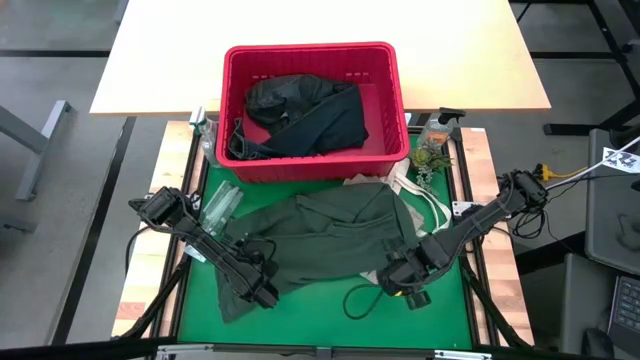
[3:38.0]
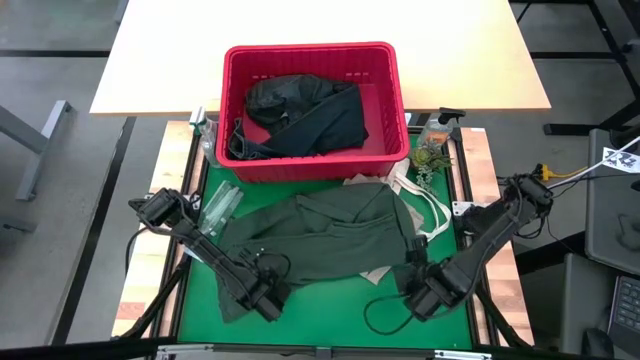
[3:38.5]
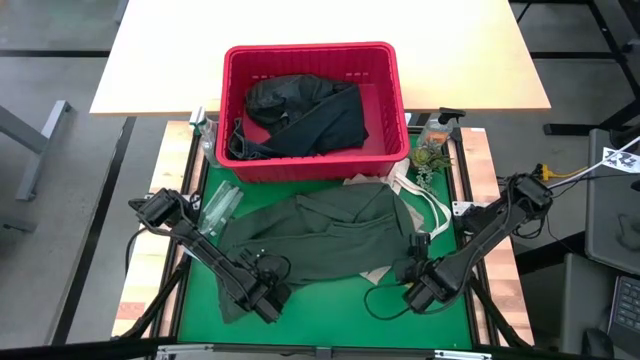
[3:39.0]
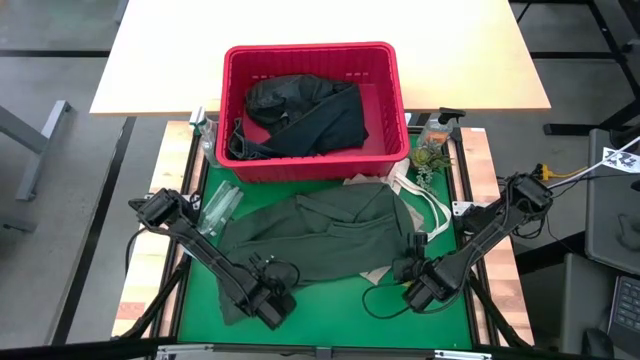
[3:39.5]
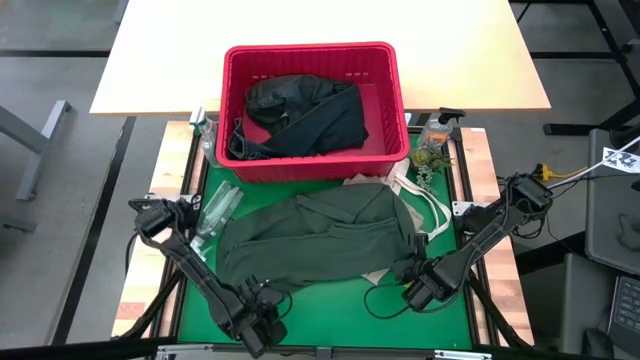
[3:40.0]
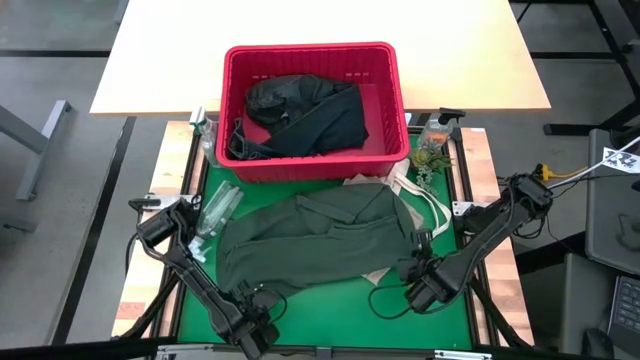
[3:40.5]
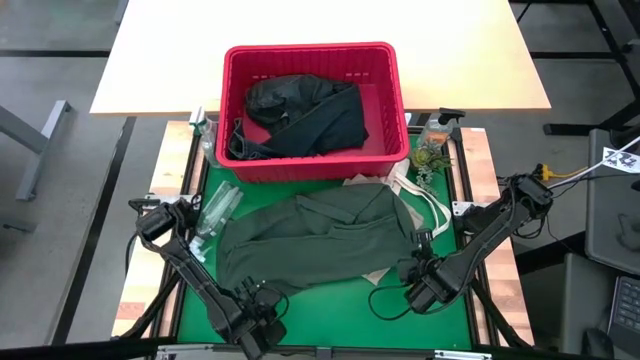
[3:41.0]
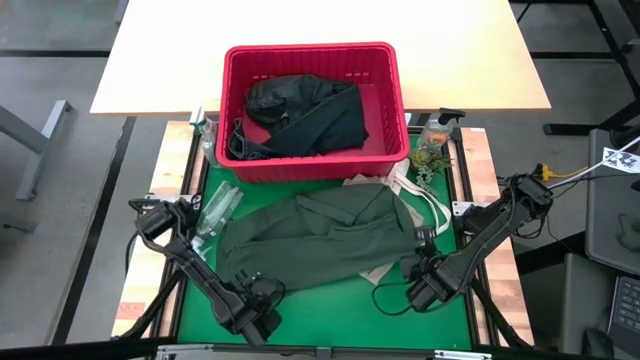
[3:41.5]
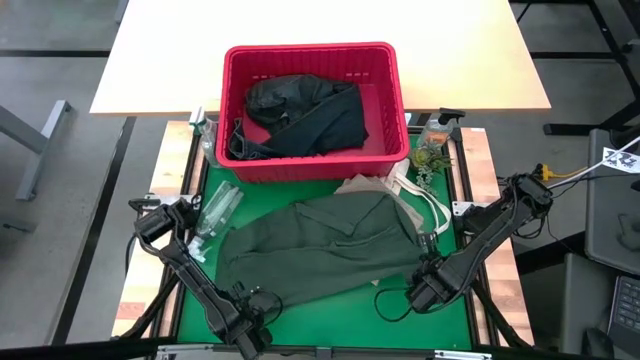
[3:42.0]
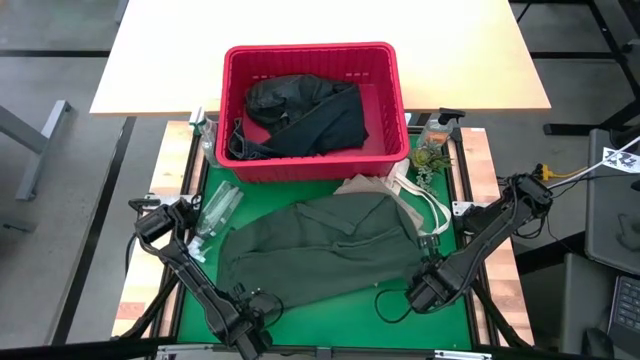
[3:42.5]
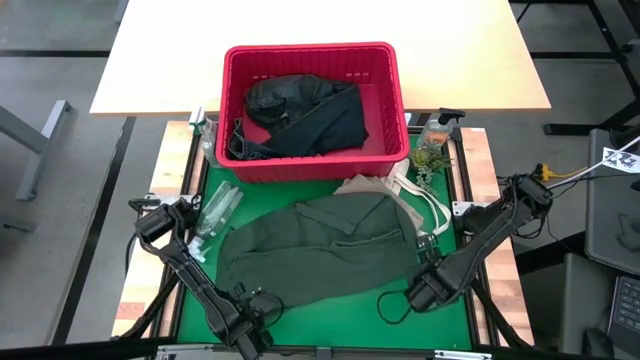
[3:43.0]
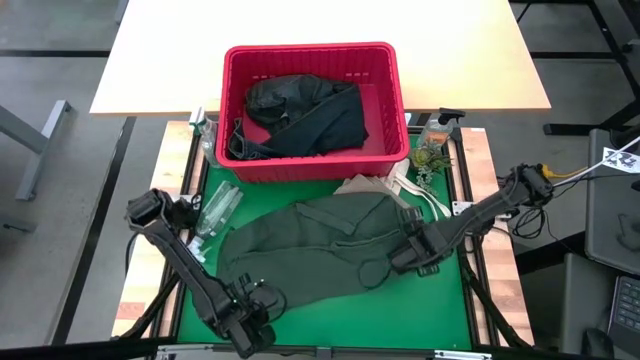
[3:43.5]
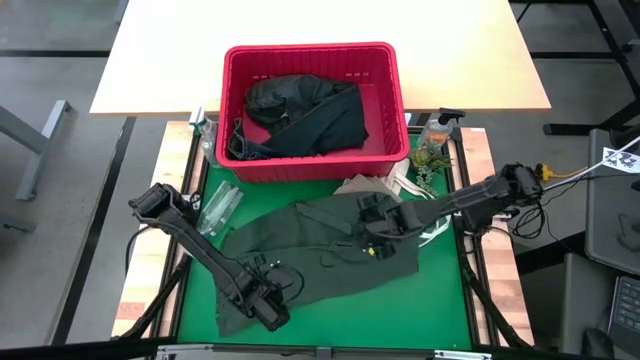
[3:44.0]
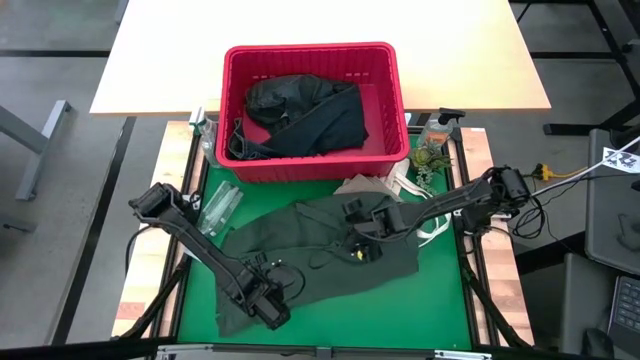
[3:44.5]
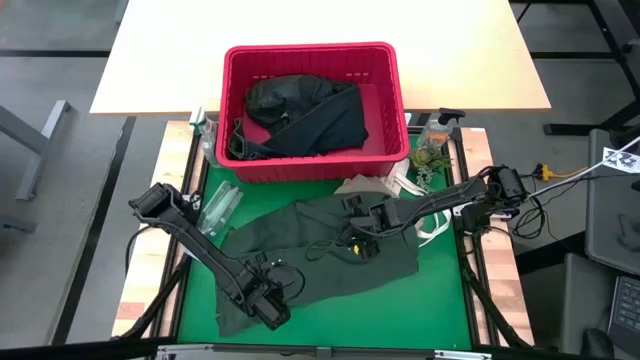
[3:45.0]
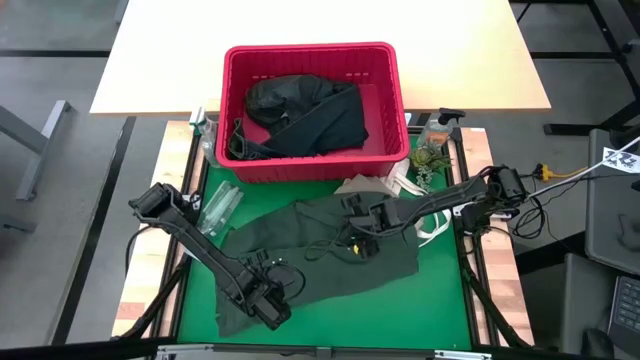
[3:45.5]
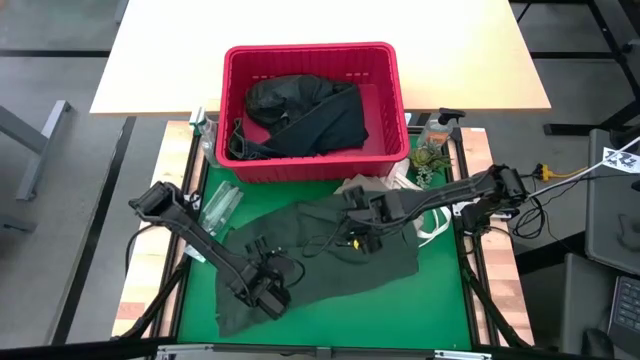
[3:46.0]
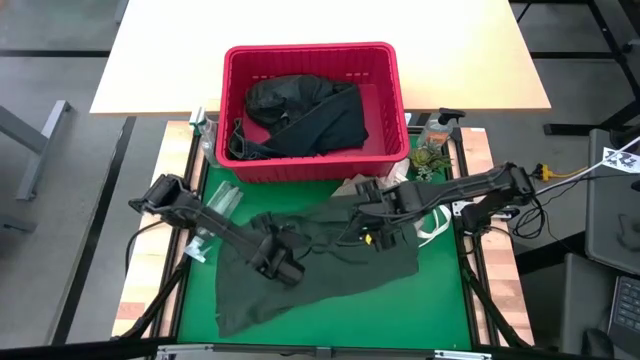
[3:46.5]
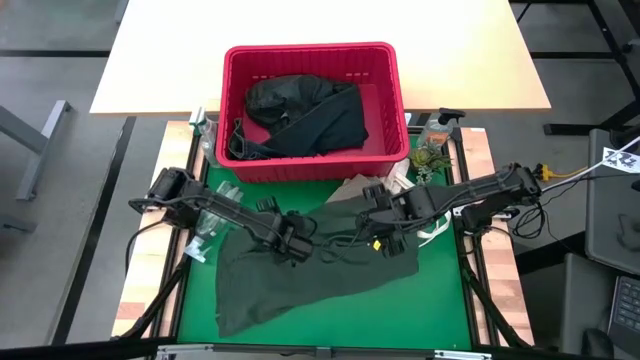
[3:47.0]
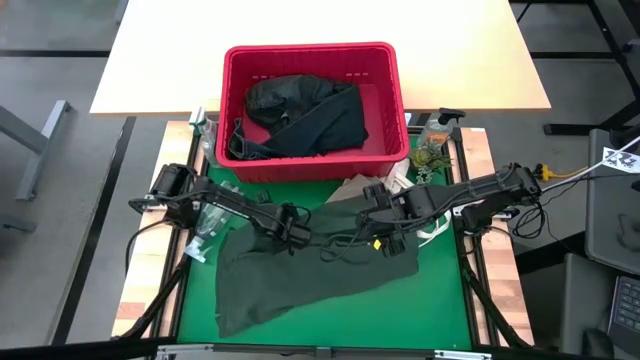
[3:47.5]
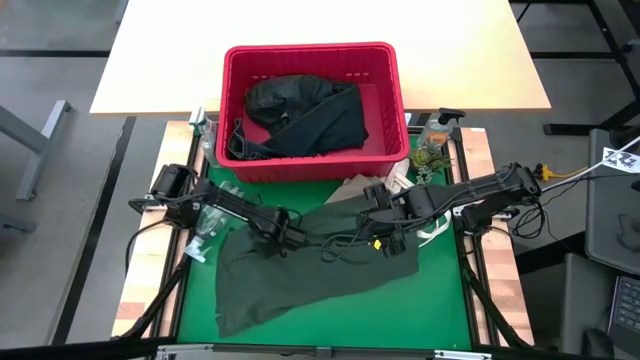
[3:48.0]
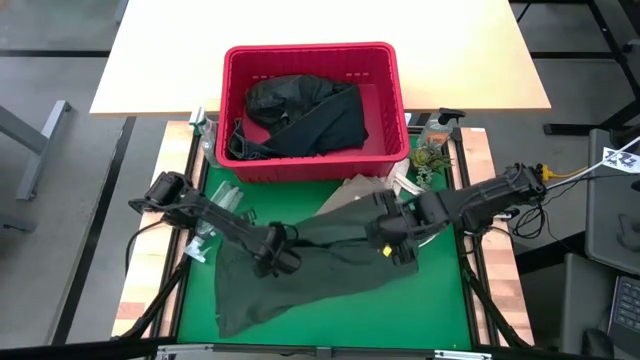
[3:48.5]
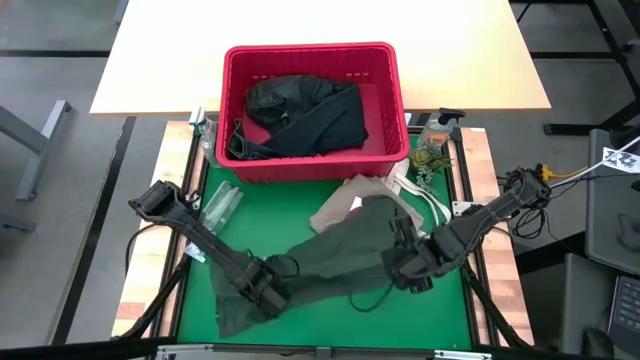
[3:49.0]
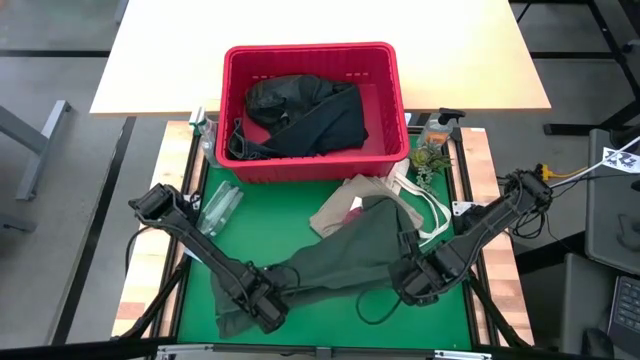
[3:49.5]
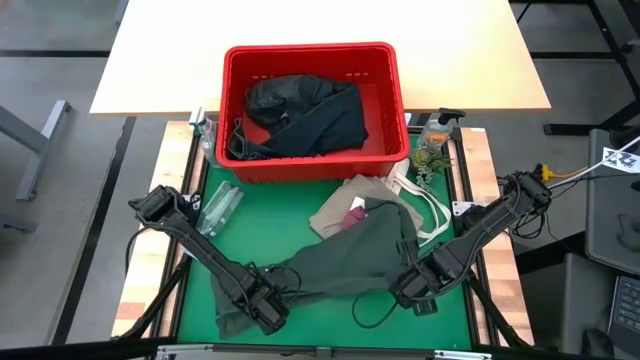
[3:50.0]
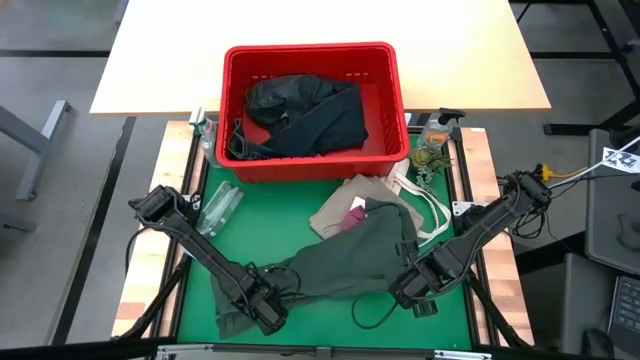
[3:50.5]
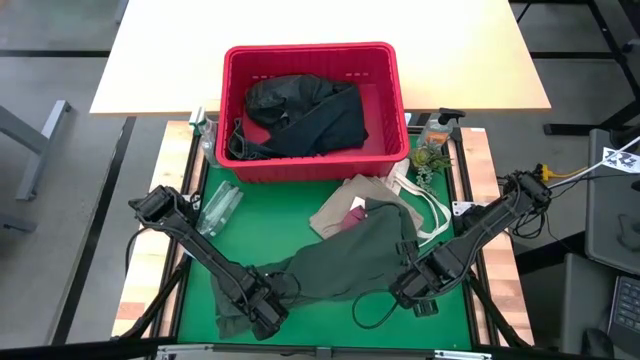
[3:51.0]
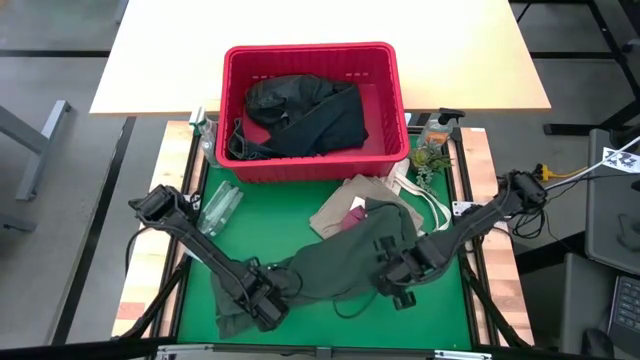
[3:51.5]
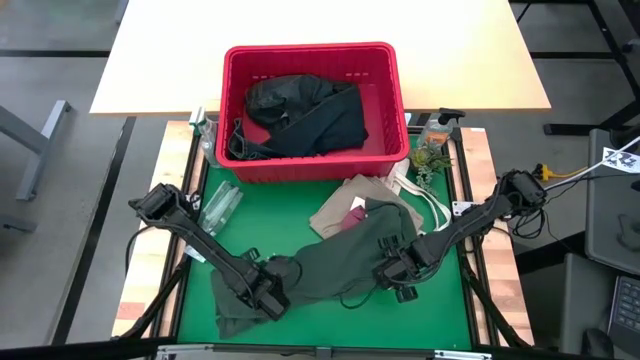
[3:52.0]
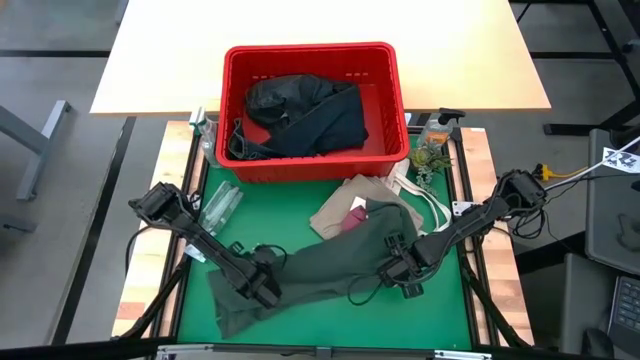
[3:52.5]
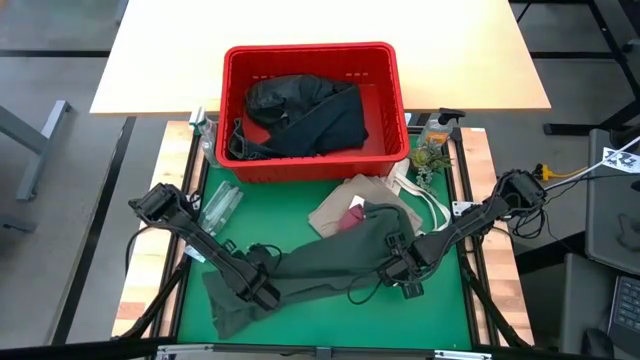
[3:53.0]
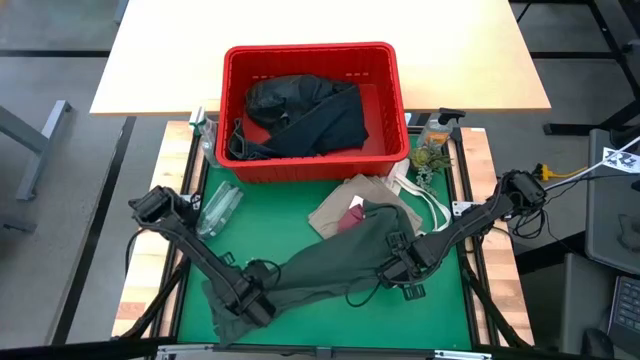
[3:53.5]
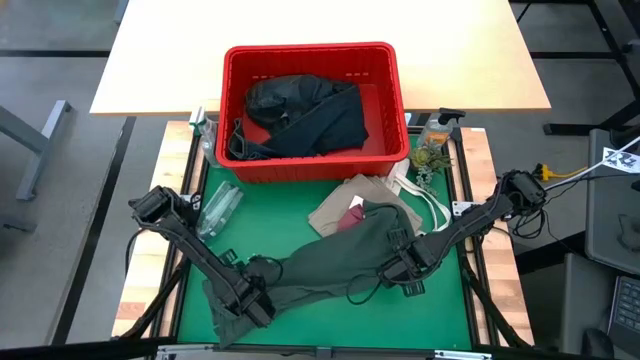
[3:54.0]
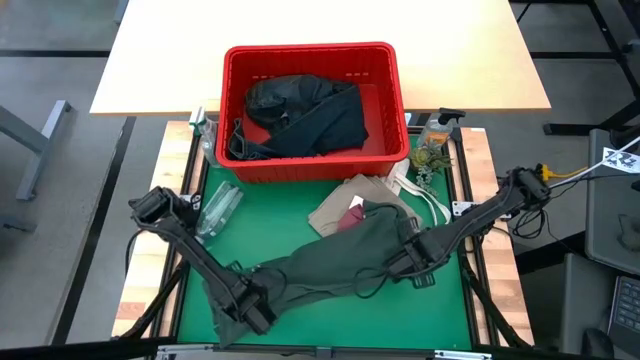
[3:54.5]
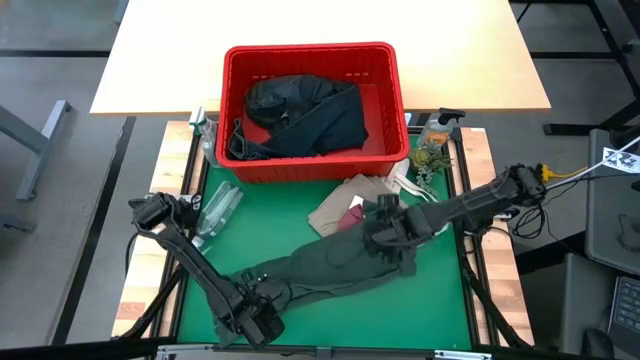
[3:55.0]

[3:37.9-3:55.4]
Task: Fold laundry
Fold the green polo shirt

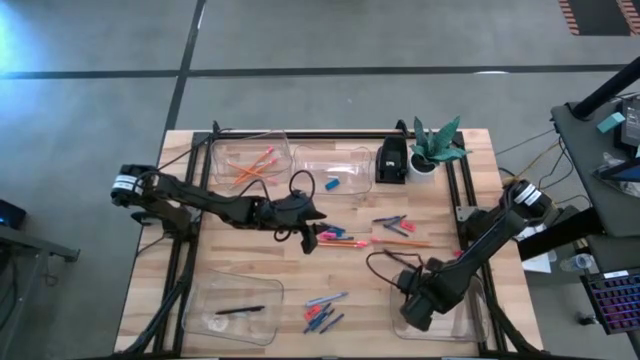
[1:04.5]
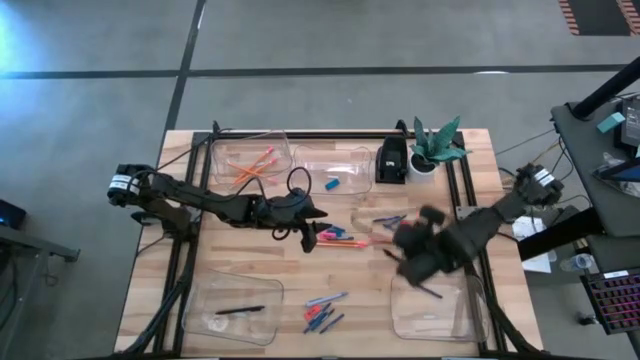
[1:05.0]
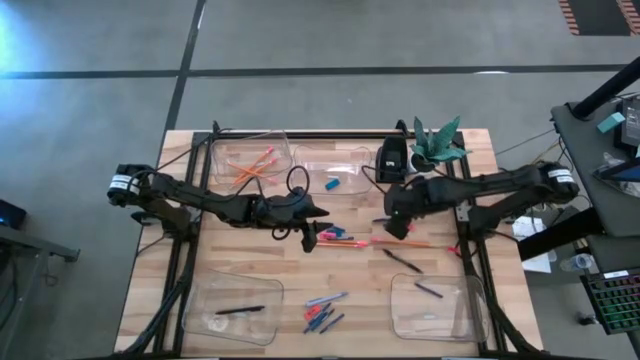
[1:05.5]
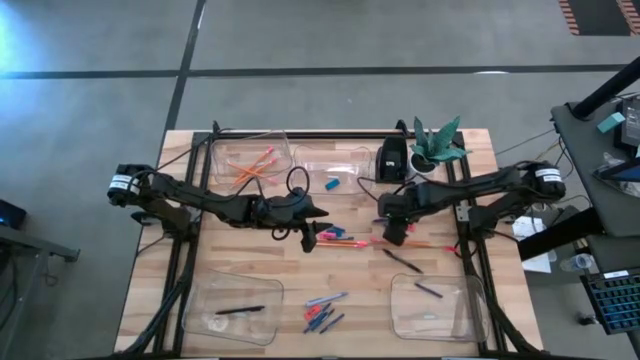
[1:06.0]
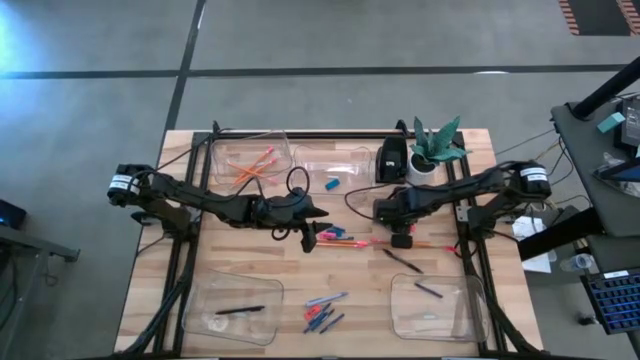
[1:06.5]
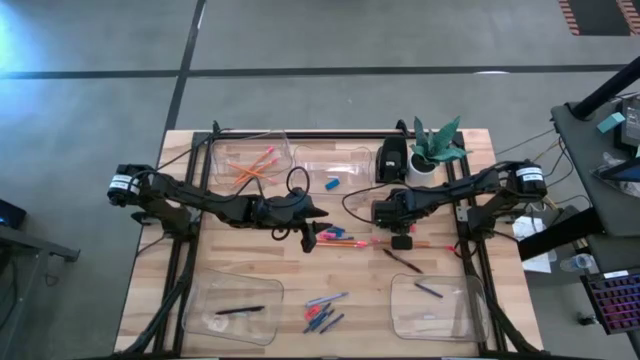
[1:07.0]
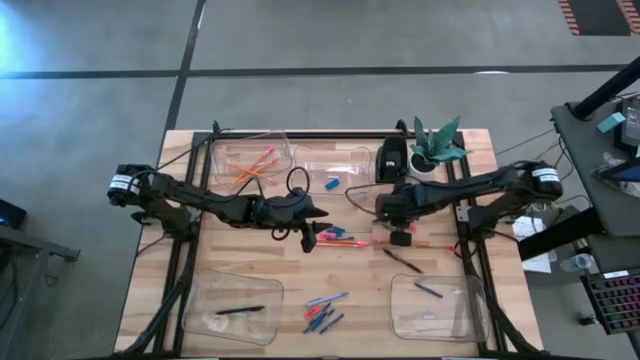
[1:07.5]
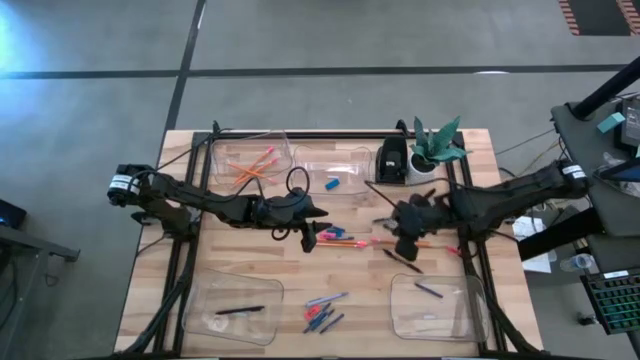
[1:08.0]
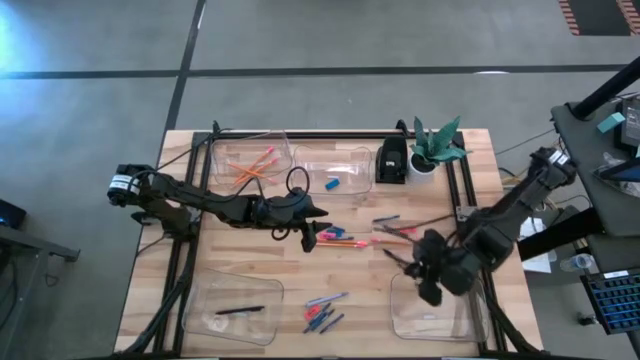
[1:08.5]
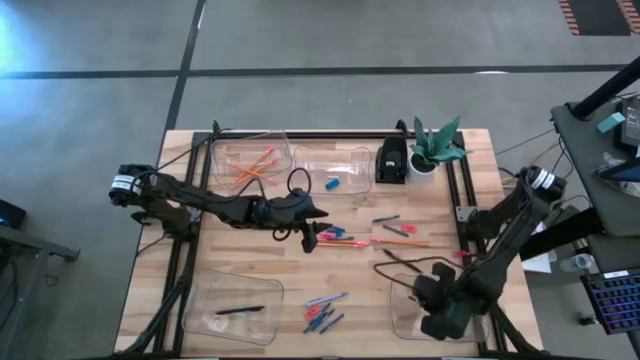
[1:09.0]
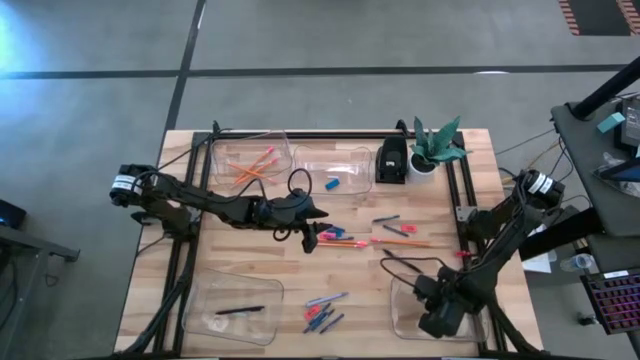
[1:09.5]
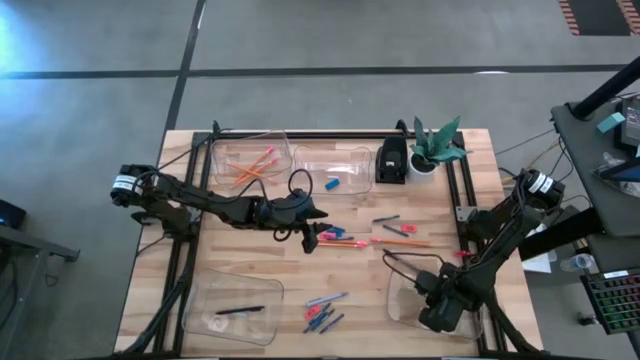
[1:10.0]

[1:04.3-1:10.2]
Task: Sort crayons/erasers/pens/pencils in bins
Put the dark blue crayon into the bottom right transparent bin
